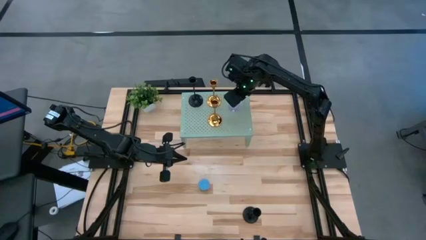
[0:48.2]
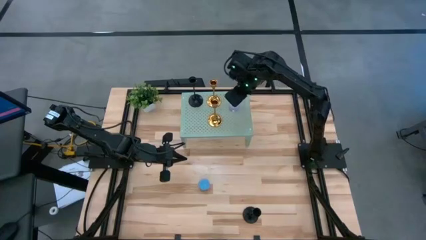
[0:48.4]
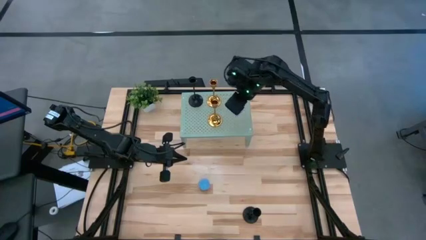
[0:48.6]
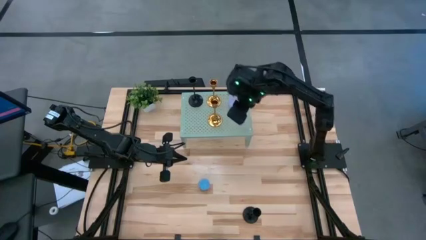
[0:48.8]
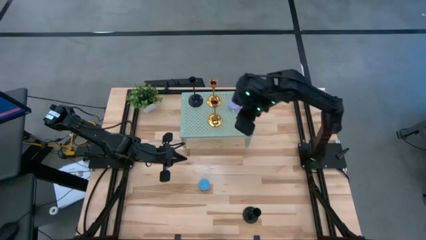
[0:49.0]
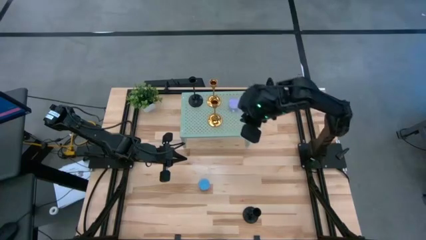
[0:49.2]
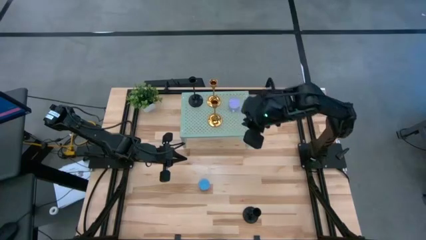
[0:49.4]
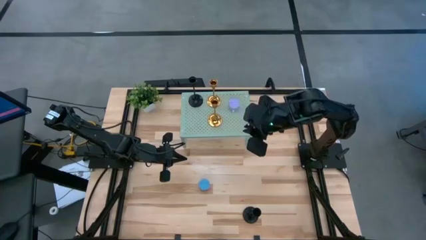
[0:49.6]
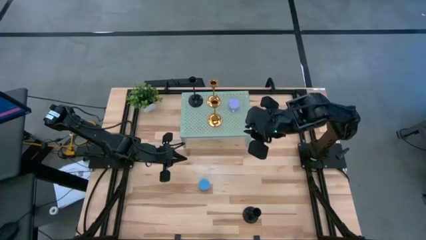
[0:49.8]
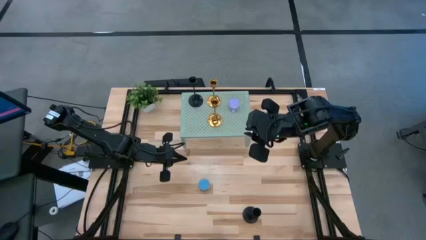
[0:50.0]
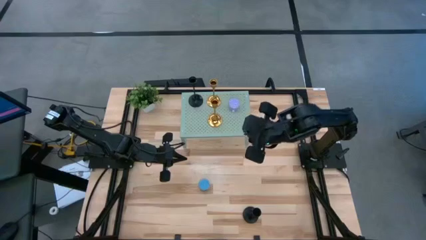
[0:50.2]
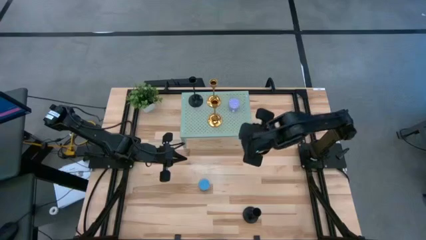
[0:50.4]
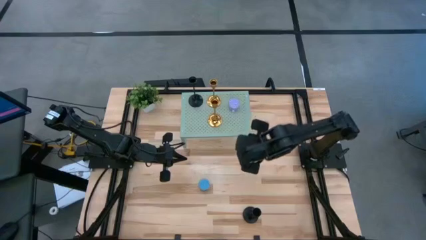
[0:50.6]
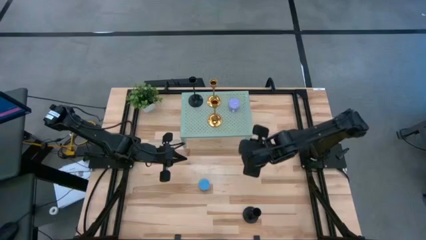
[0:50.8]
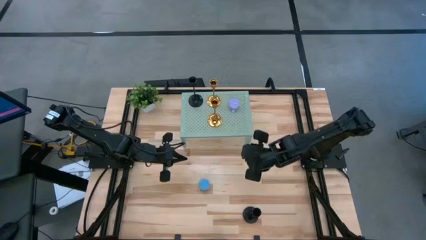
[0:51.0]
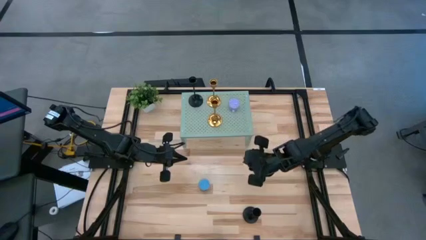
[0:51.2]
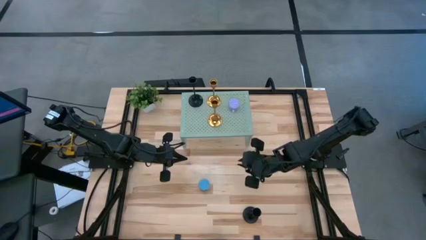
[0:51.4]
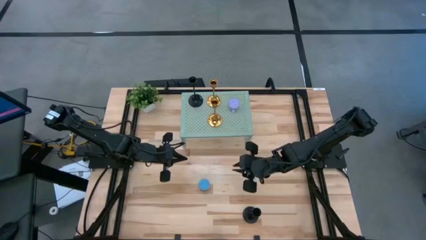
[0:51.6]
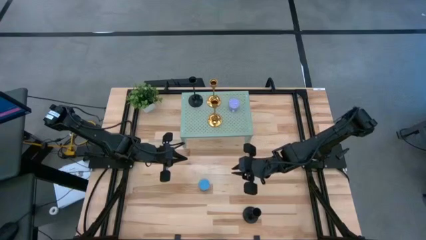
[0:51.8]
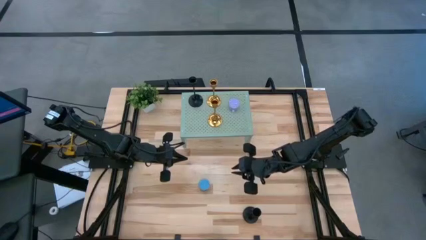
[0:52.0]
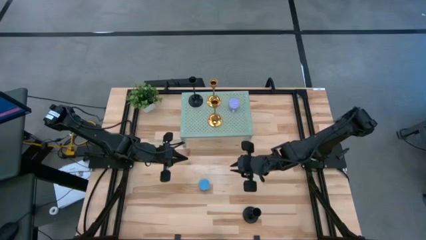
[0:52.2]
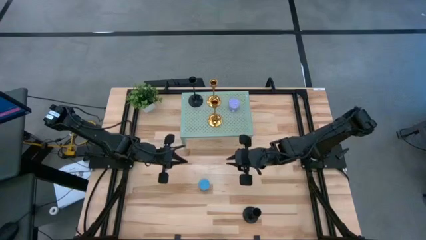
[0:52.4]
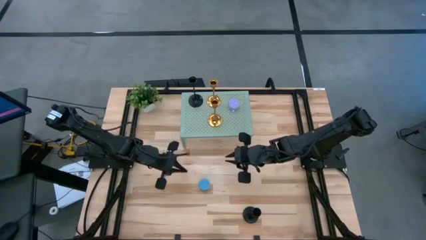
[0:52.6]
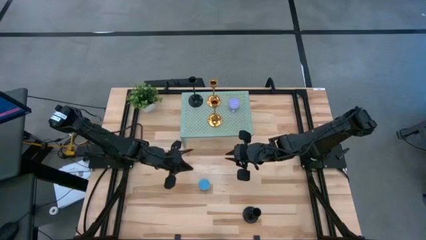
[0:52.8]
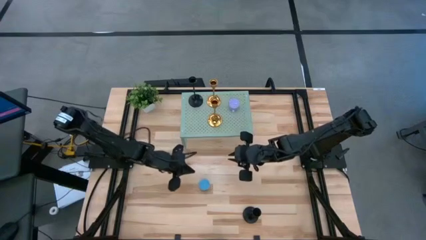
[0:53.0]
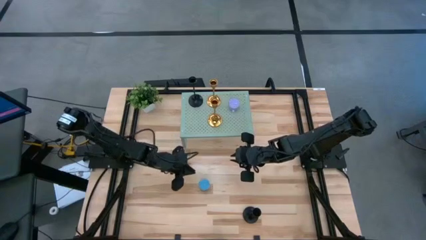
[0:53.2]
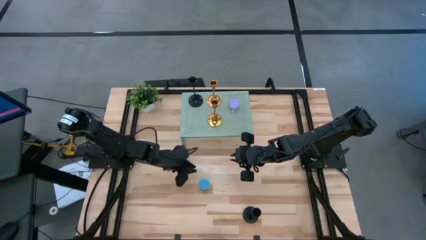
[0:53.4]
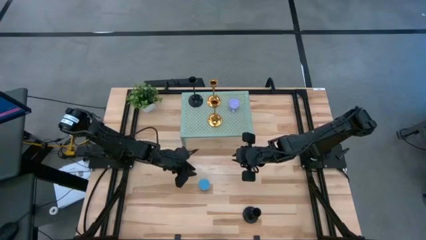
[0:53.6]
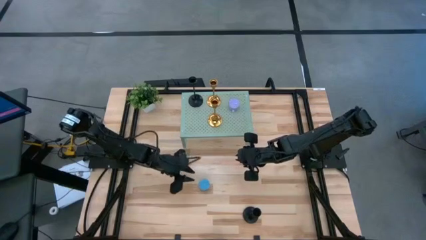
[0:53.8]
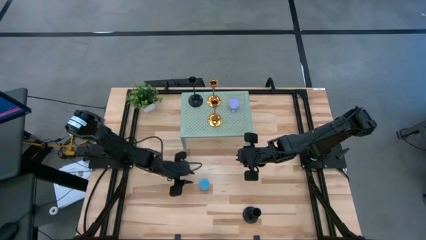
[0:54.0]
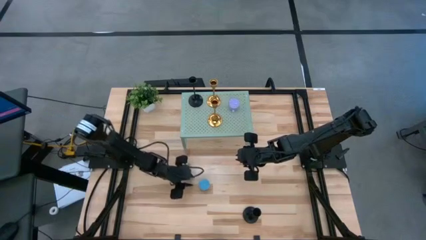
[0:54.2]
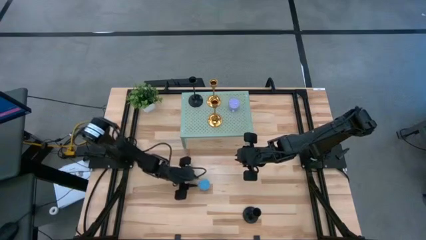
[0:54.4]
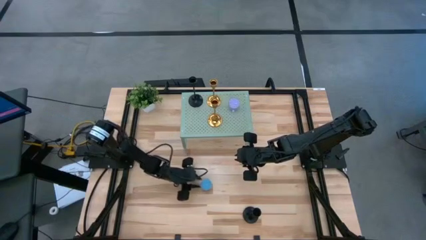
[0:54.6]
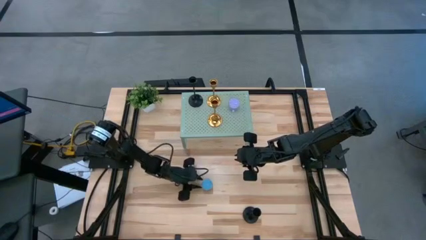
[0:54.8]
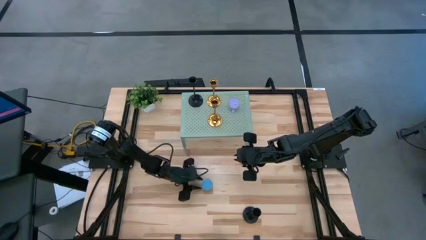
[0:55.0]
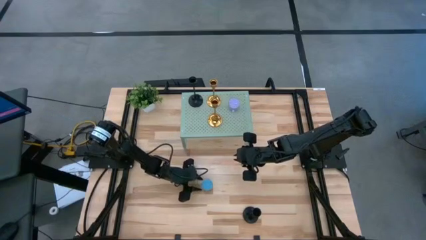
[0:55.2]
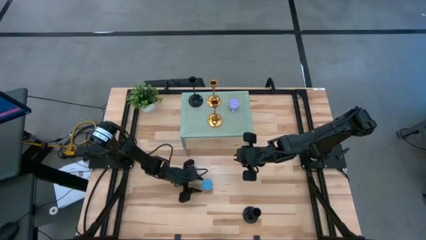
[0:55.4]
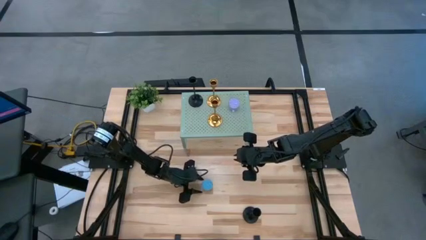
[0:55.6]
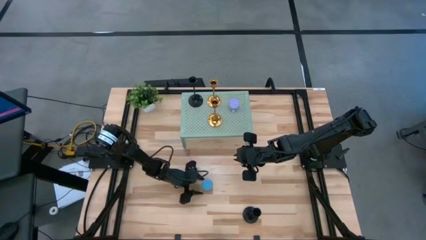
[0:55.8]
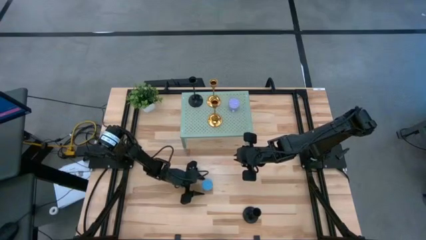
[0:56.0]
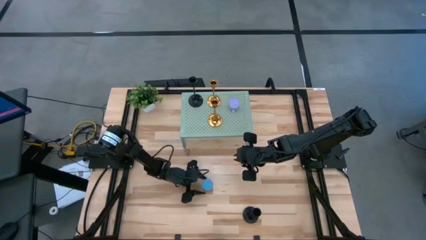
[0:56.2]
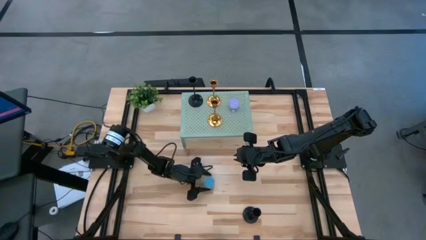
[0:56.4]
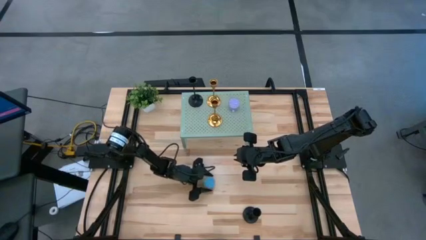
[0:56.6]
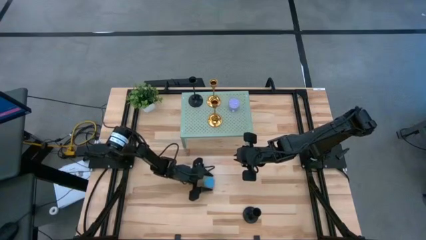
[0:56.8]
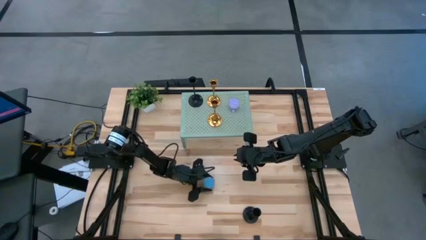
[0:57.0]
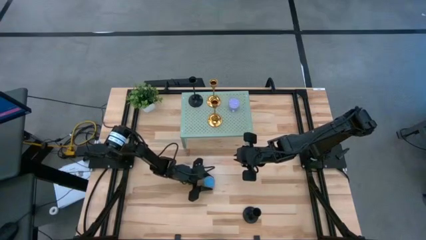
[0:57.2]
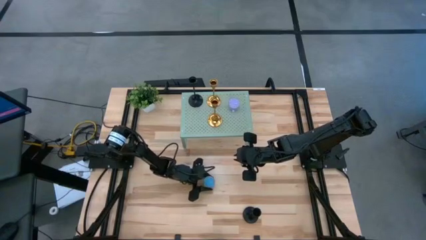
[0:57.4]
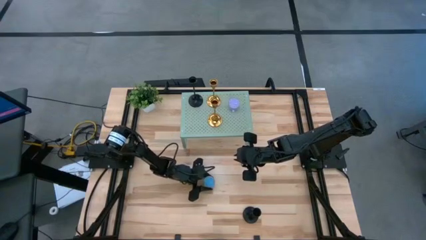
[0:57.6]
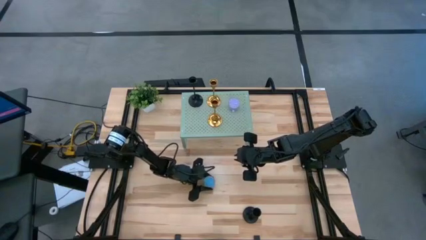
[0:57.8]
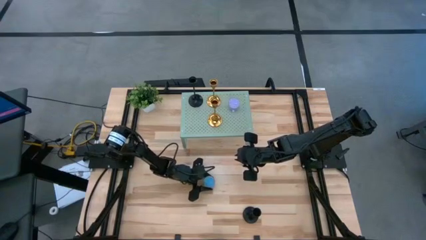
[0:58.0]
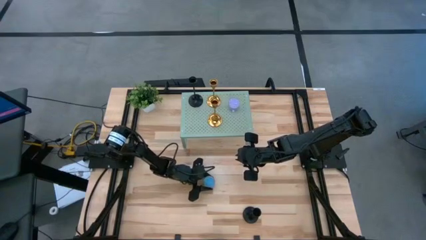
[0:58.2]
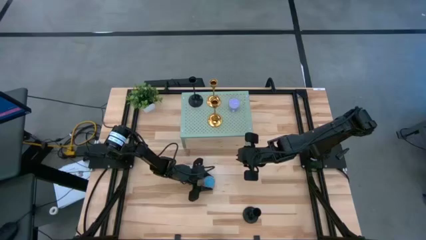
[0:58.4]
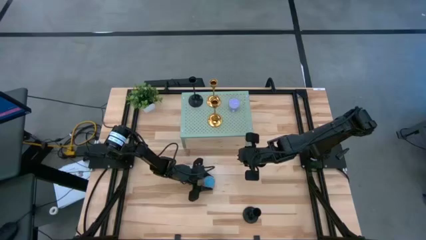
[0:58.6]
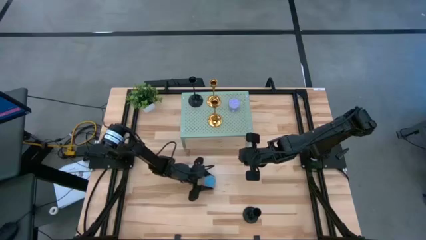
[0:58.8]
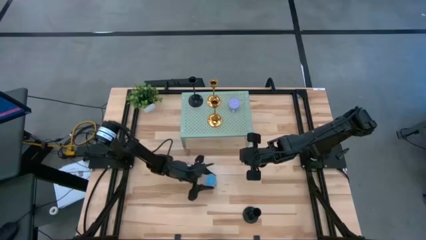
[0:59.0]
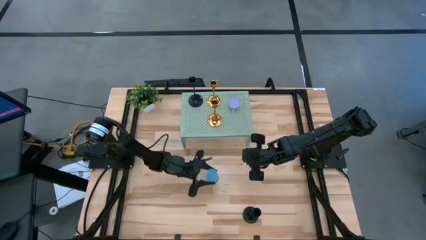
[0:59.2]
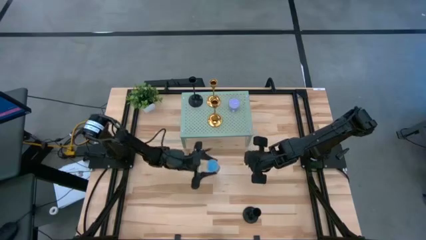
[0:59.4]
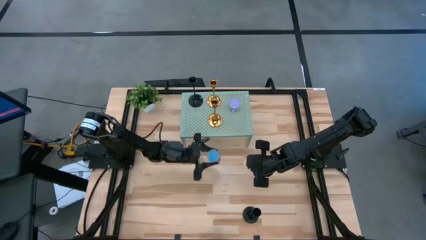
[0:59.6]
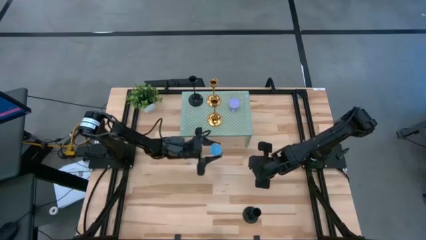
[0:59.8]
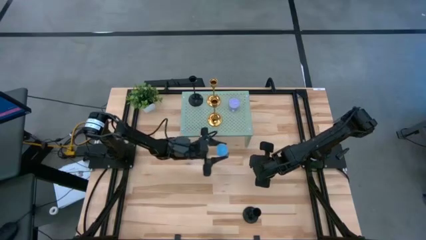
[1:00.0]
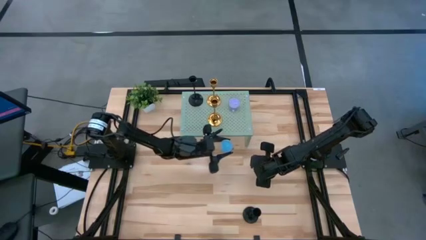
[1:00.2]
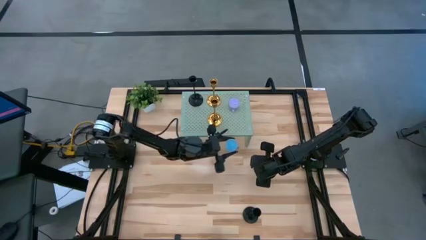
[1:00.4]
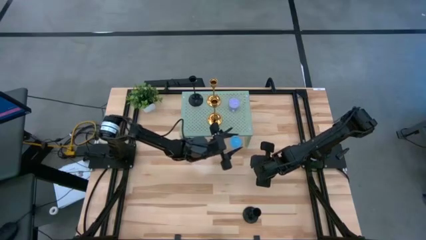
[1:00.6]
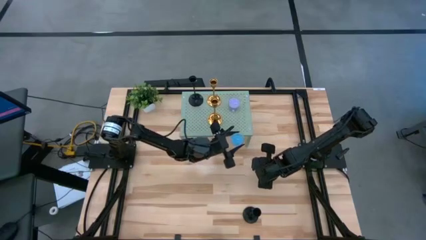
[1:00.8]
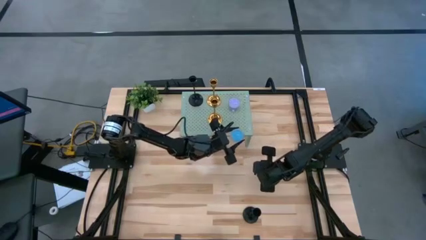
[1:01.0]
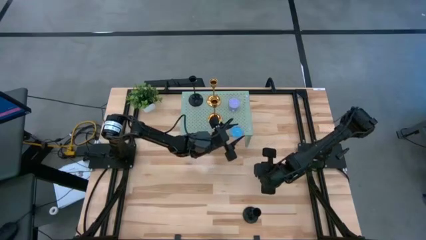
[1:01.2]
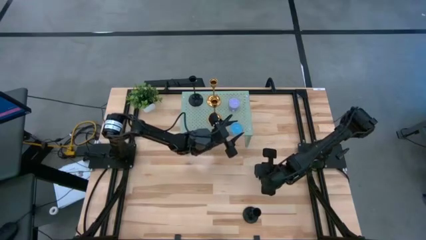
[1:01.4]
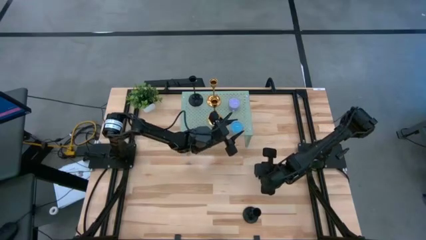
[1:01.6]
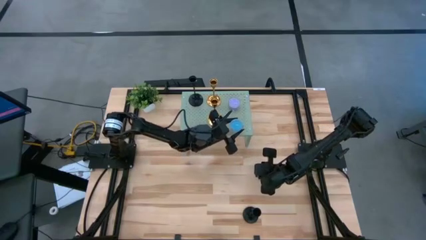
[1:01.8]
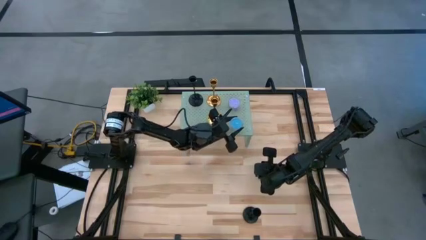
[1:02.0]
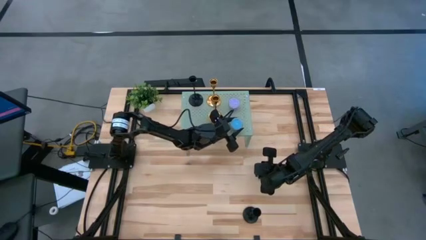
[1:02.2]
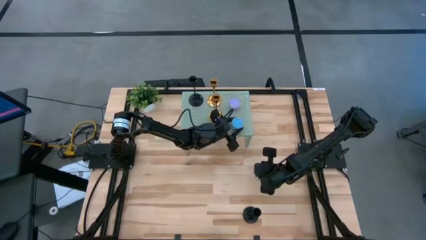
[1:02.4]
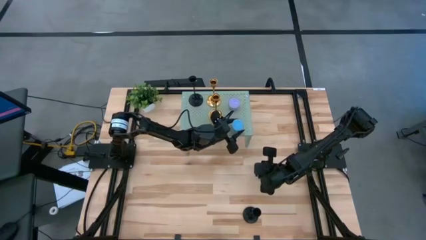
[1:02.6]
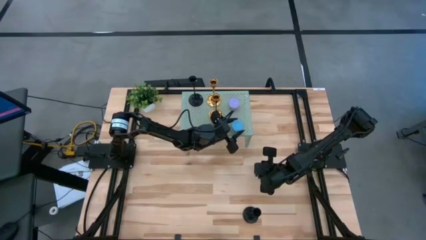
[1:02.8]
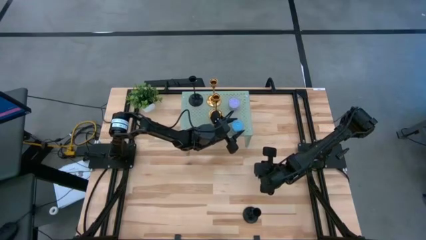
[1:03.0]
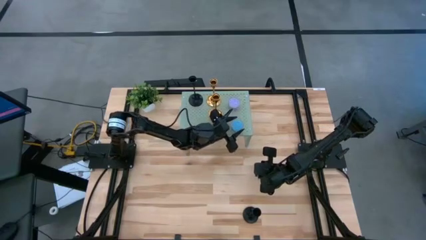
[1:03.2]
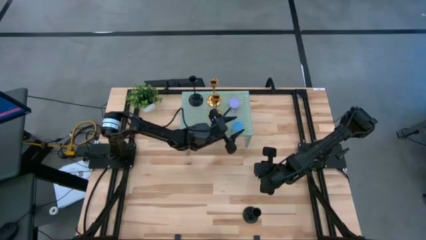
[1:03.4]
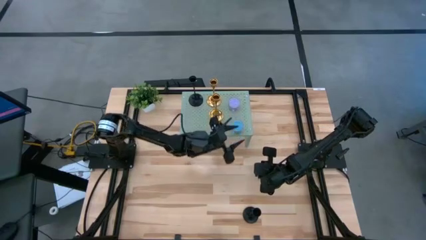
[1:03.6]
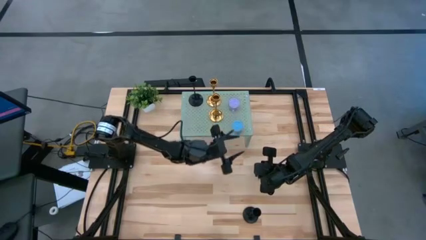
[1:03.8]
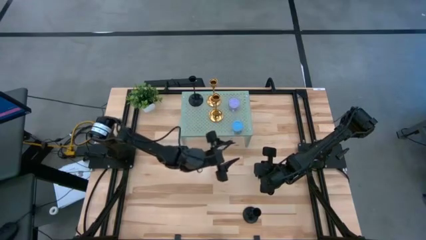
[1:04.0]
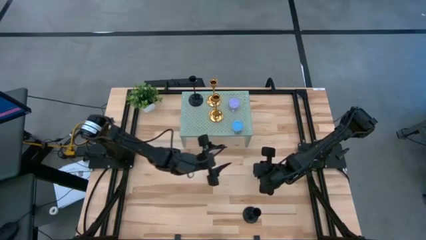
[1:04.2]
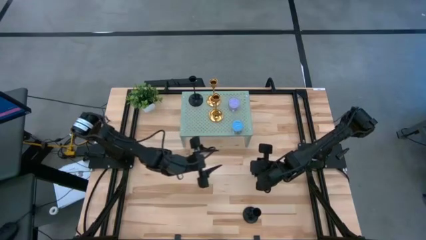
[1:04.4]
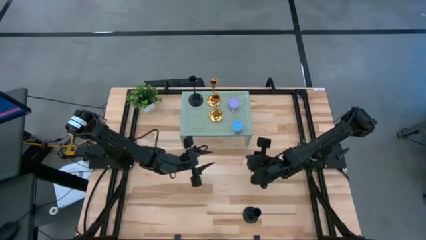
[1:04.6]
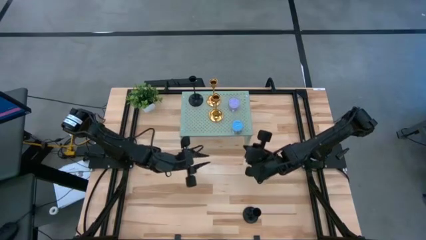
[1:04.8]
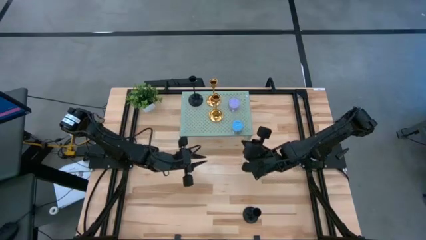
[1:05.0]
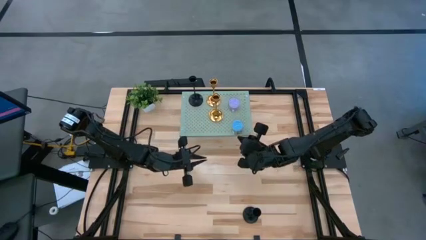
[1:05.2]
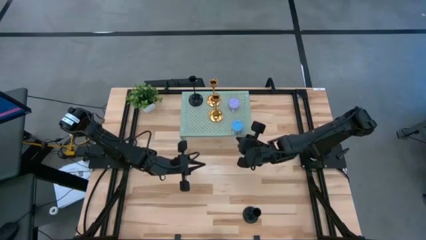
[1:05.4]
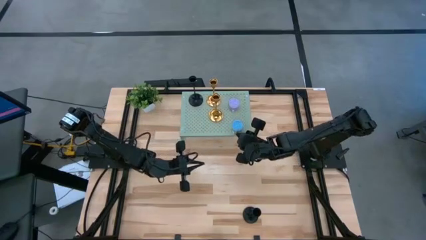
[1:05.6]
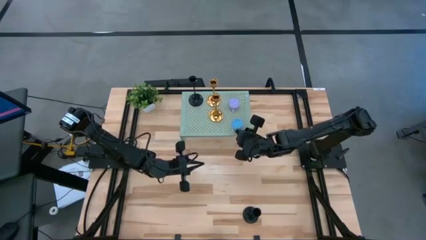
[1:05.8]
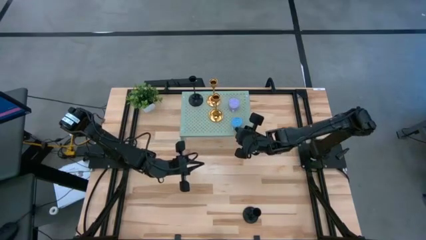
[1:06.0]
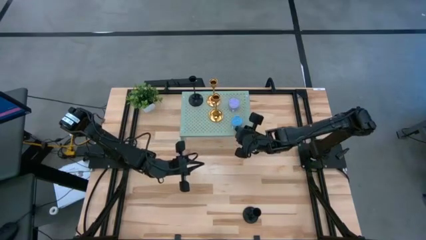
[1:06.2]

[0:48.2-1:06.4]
Task: Pick & Place candle stick holders
Put the blue scented candle on the shelf
